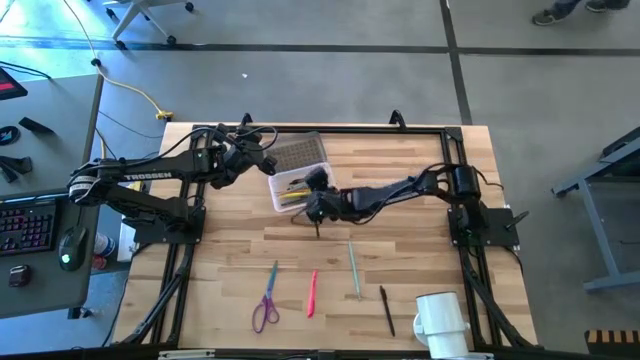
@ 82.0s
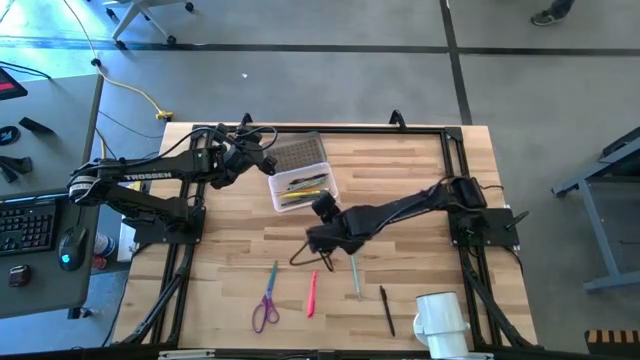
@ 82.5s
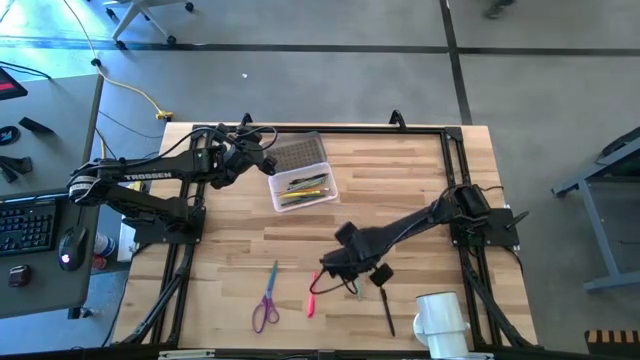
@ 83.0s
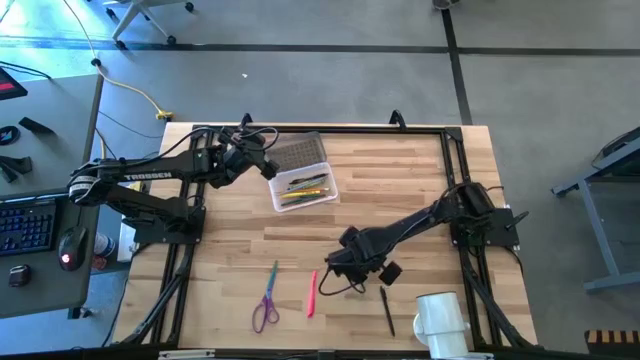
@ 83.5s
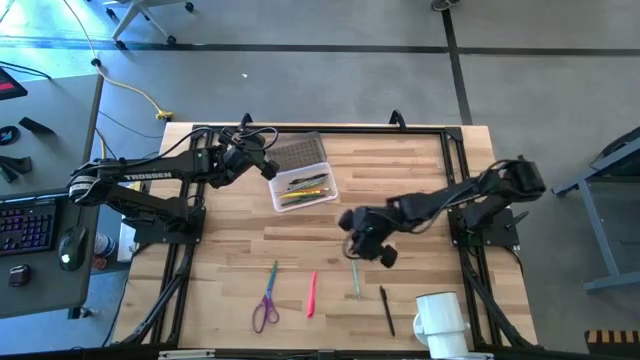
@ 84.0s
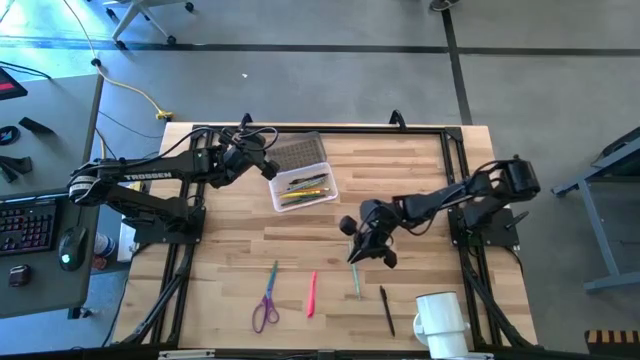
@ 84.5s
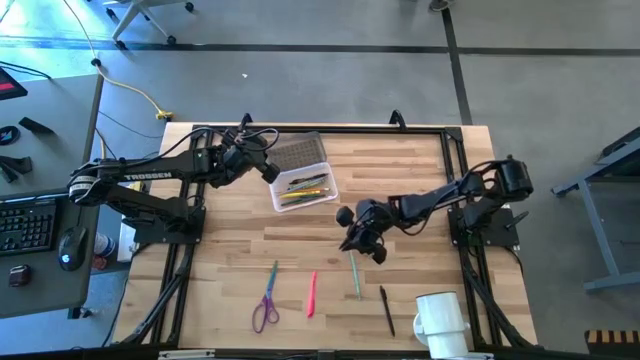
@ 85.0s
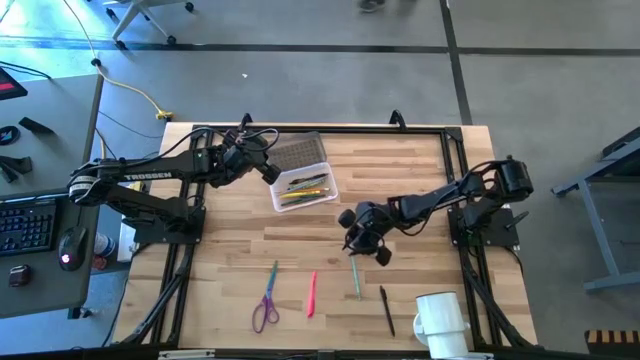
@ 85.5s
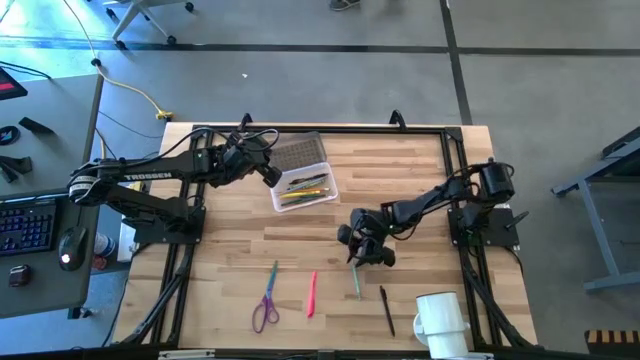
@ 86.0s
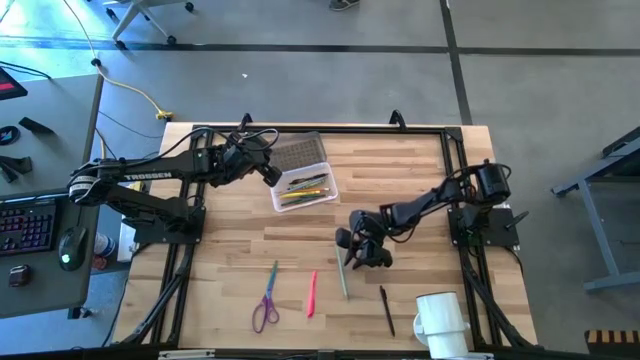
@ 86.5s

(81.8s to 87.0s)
Task: Pick & place school supplies into a supply box
Put the blue green colored pencil into the transparent supply box

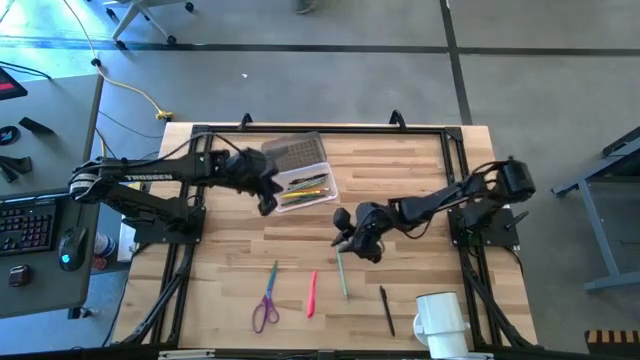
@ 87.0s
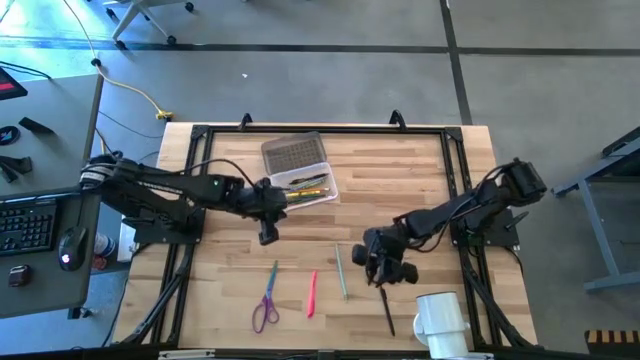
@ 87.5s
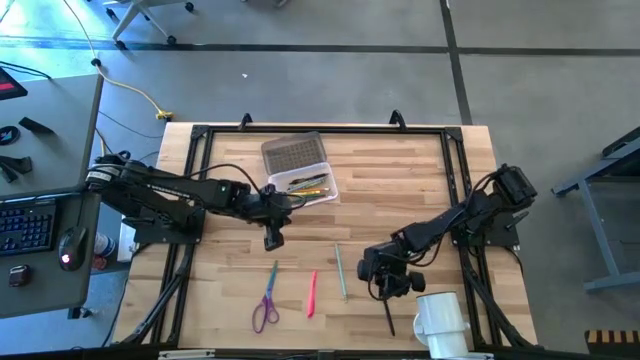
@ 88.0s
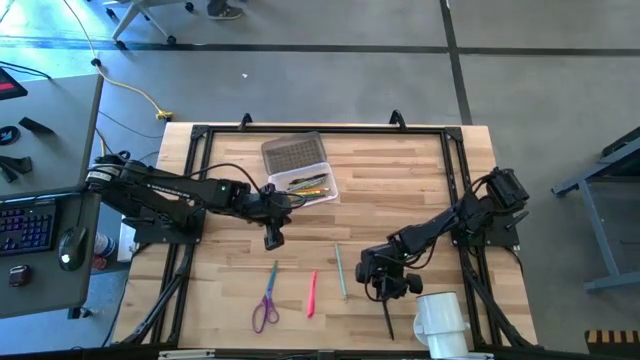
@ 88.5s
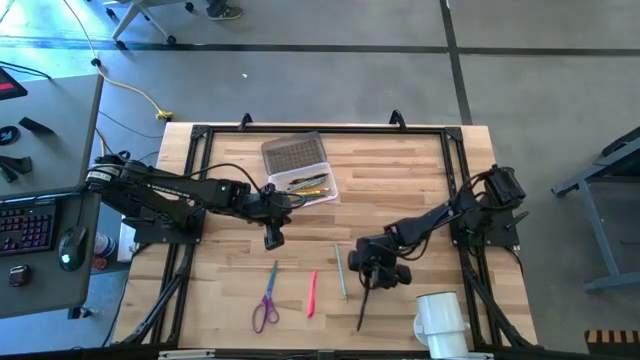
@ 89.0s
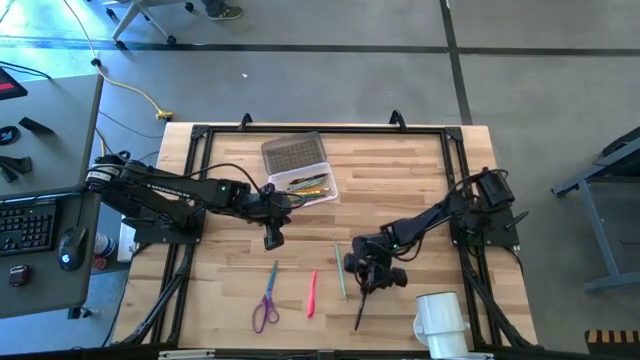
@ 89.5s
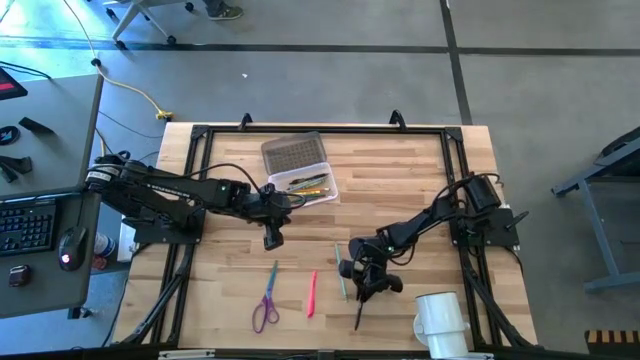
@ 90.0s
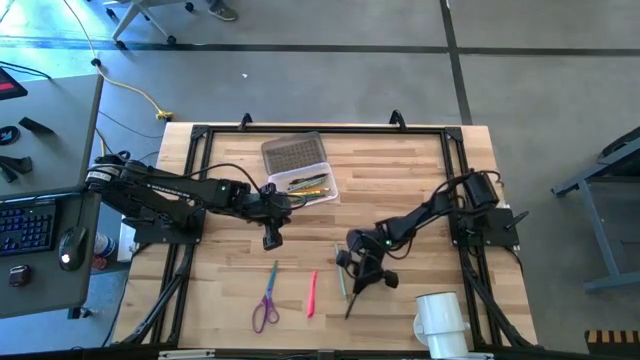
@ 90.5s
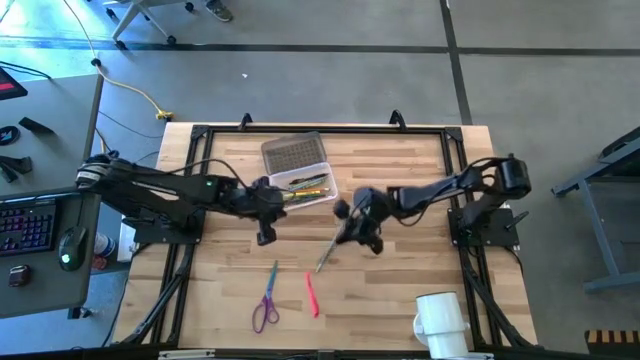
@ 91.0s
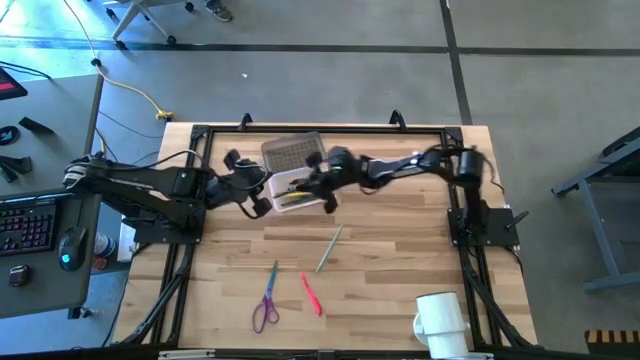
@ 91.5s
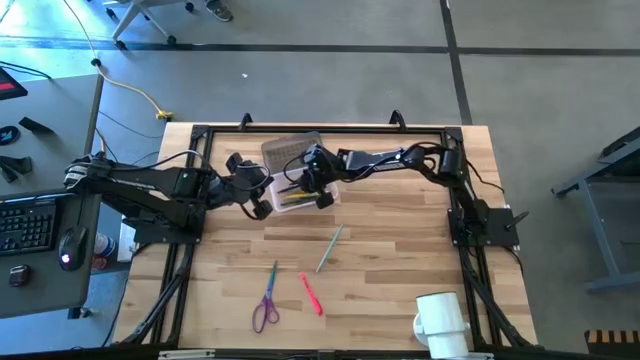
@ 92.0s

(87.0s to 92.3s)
Put the black pen into the transparent supply box

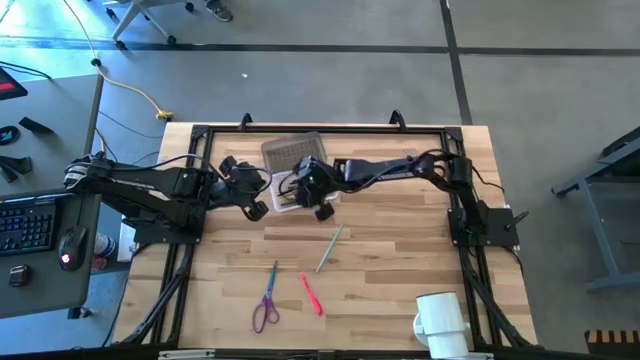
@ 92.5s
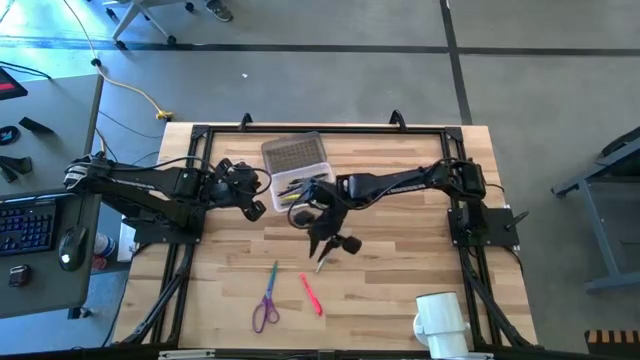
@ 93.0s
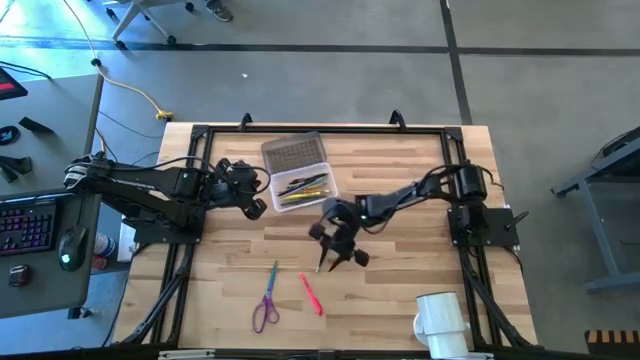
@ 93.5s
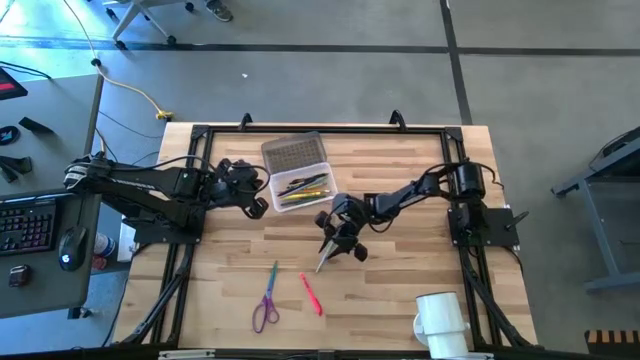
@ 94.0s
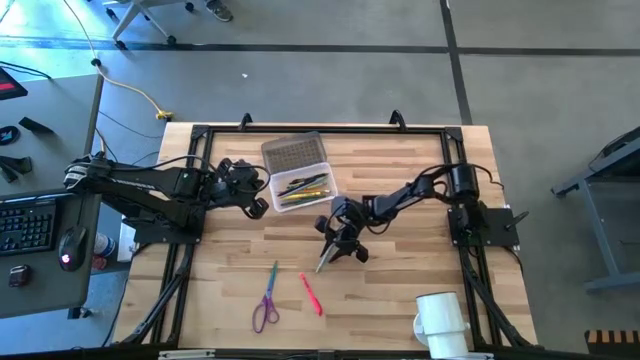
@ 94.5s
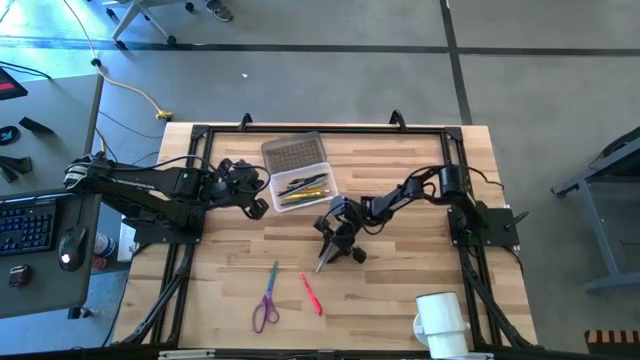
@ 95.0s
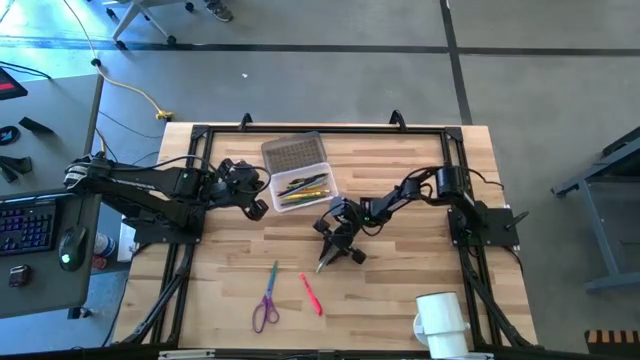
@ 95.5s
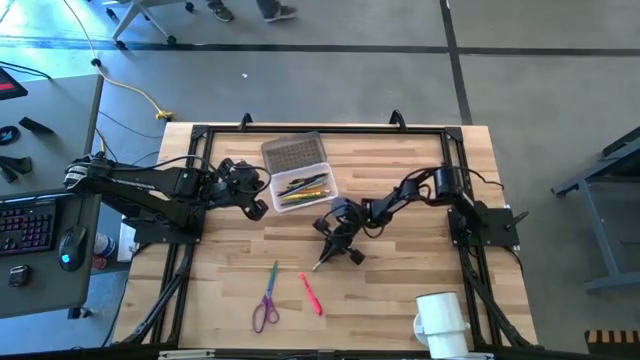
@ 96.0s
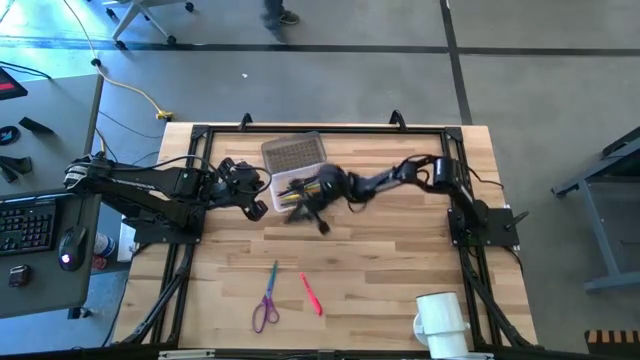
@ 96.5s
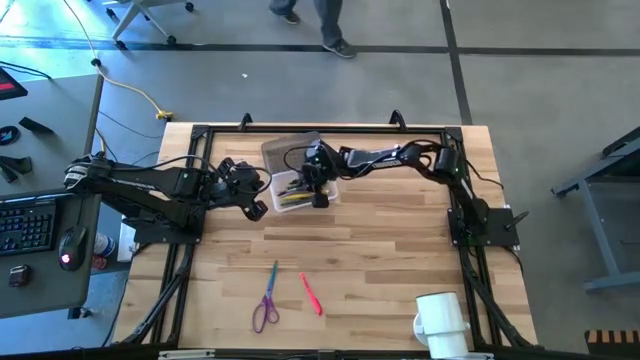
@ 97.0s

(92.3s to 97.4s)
Put the blue green colored pencil into the transparent supply box

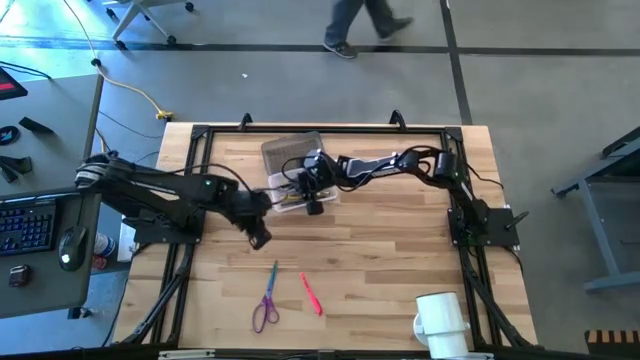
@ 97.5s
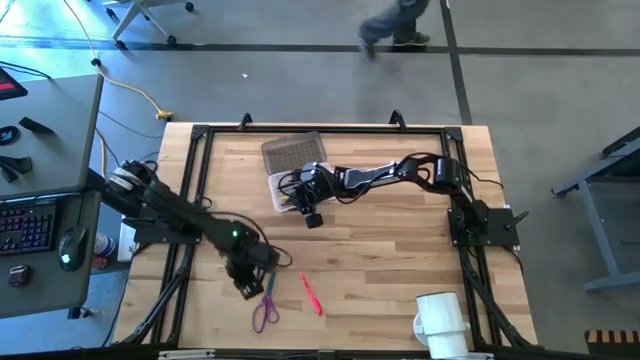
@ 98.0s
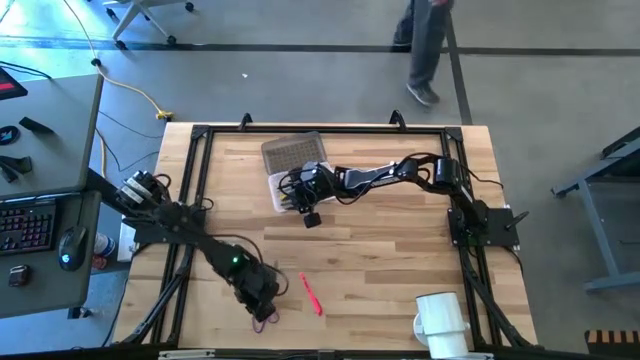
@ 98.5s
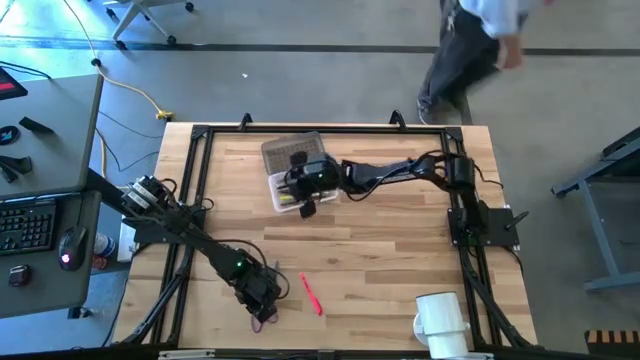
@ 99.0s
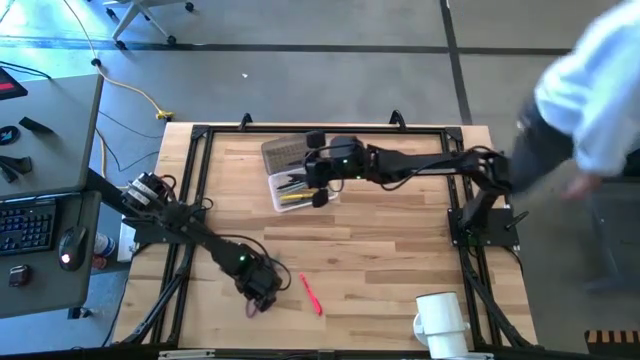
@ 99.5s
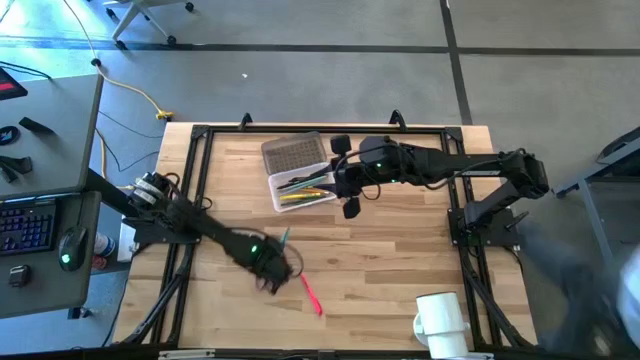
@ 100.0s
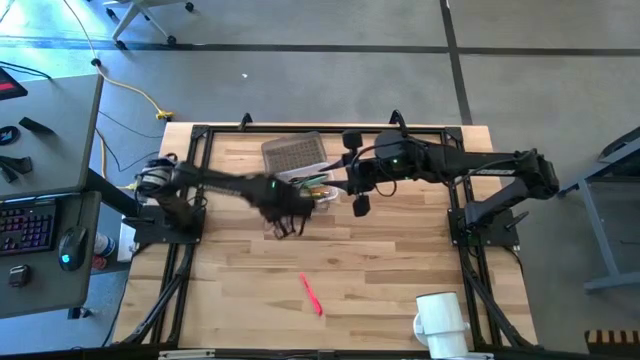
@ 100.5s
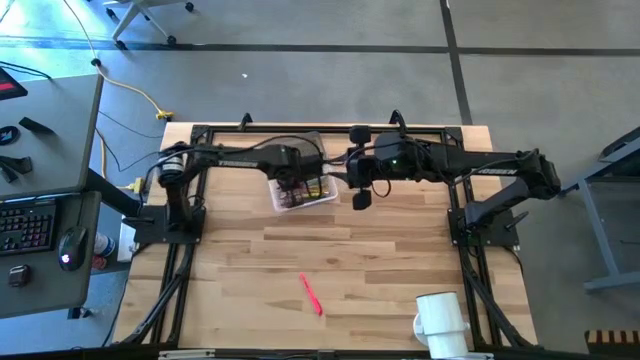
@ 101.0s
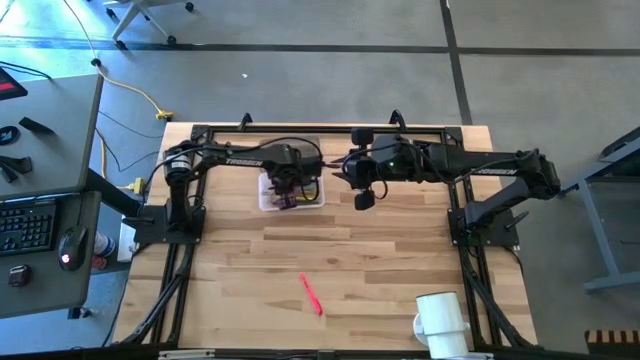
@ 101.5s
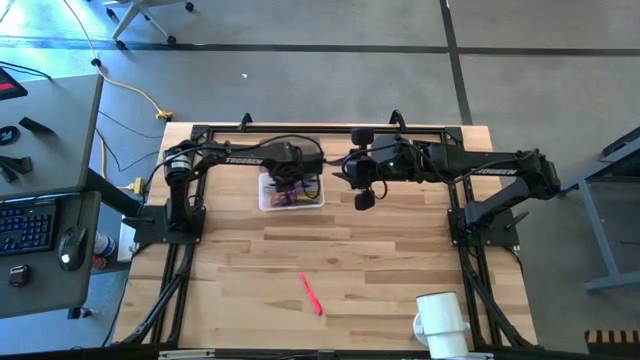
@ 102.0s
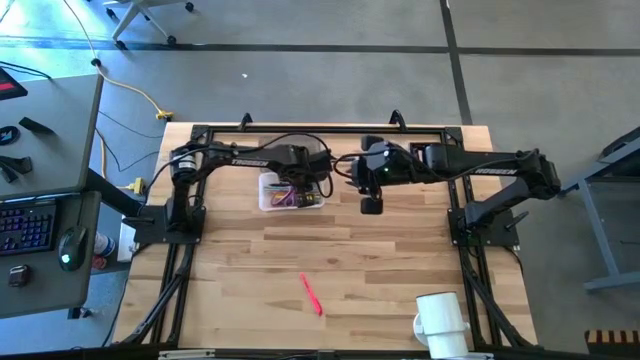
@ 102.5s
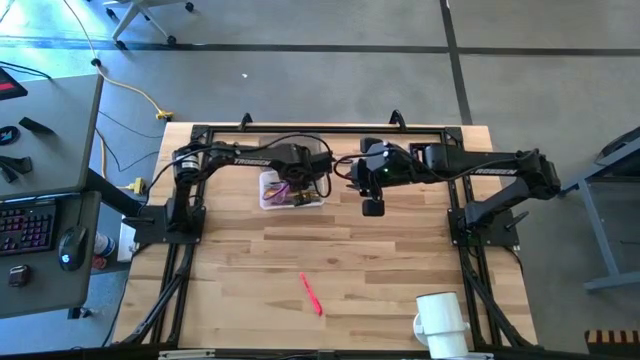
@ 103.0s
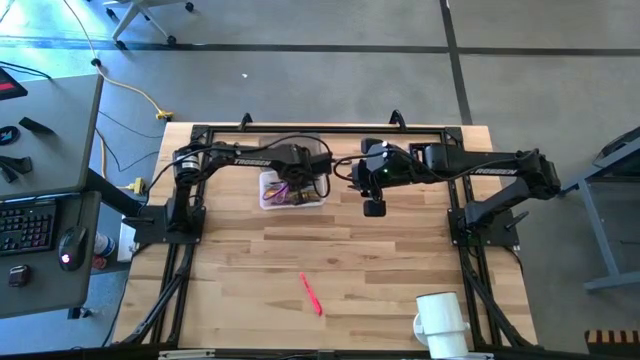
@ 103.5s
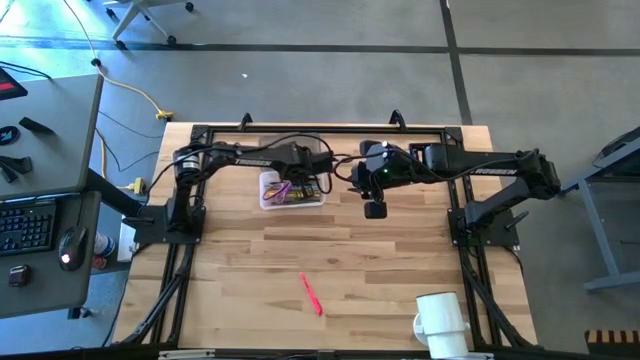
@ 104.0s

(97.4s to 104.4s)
Put the purple scissor into the transparent supply box
